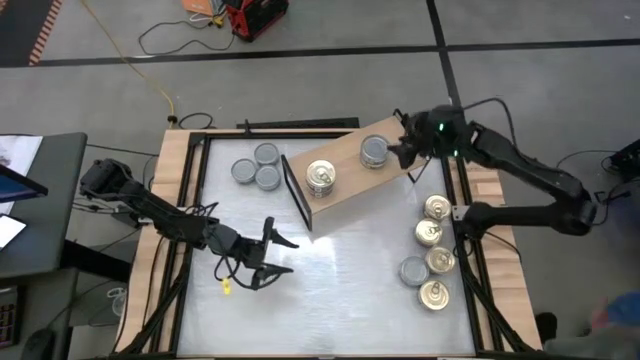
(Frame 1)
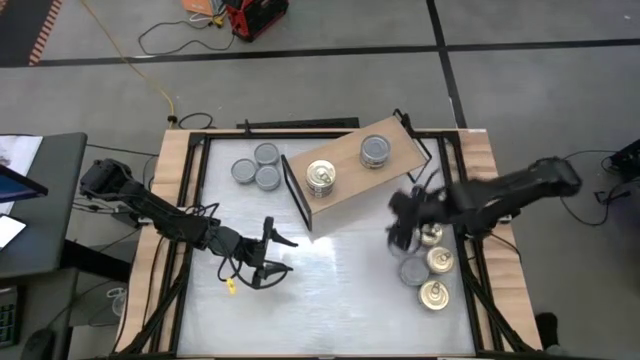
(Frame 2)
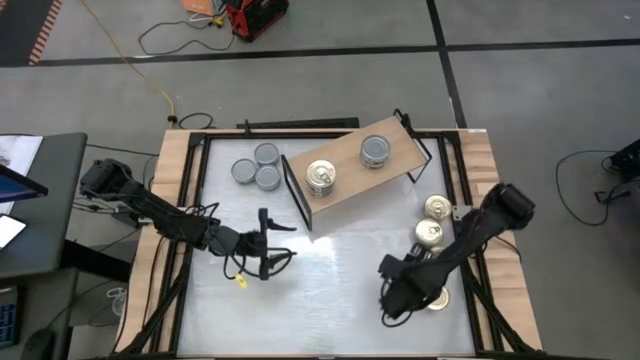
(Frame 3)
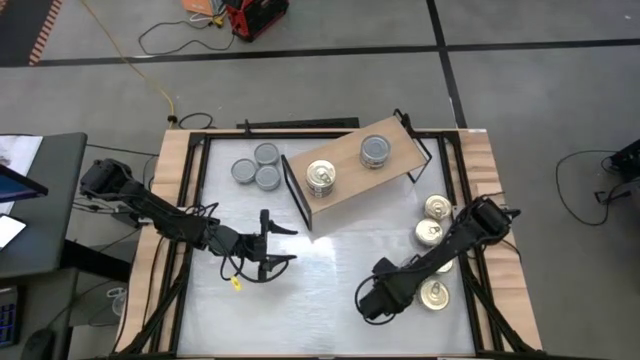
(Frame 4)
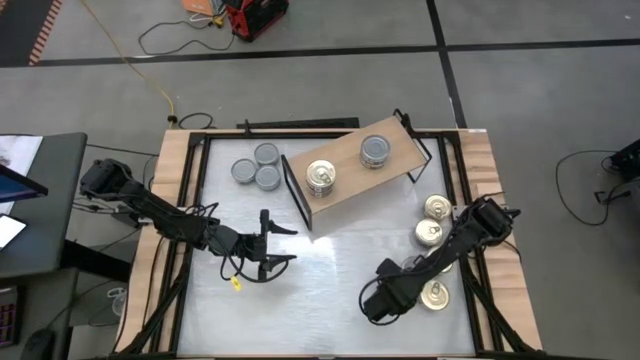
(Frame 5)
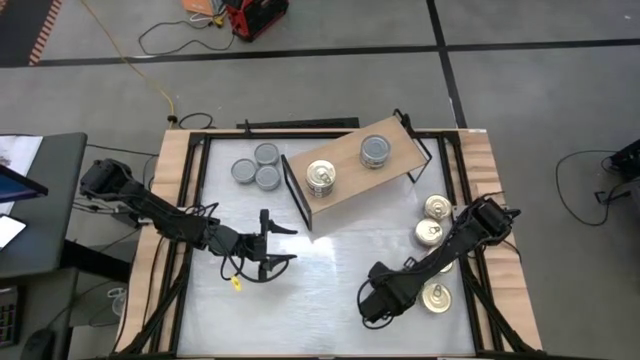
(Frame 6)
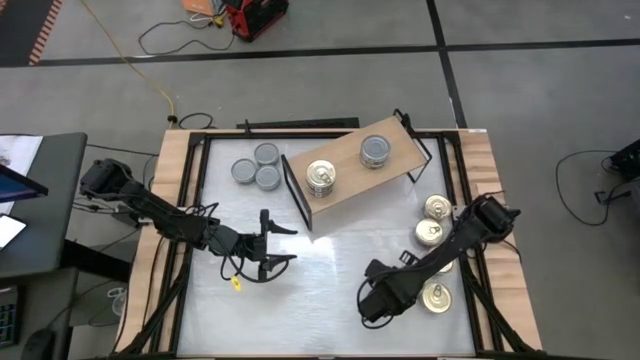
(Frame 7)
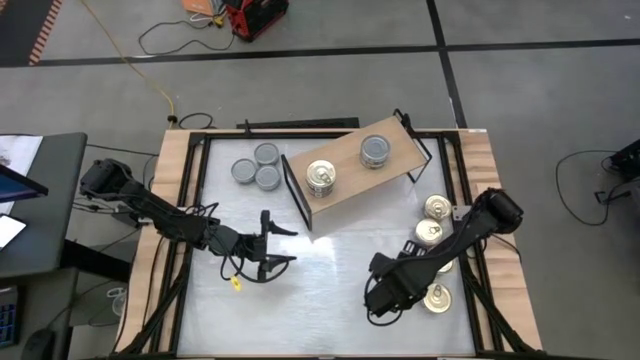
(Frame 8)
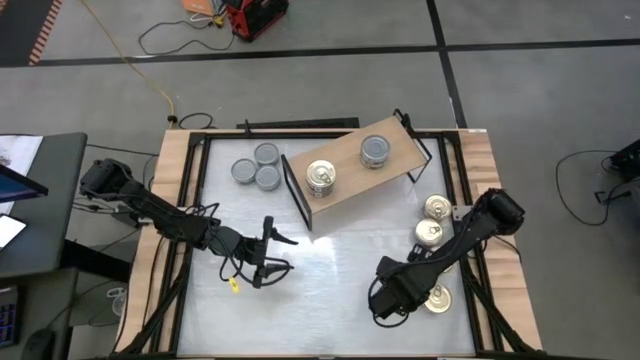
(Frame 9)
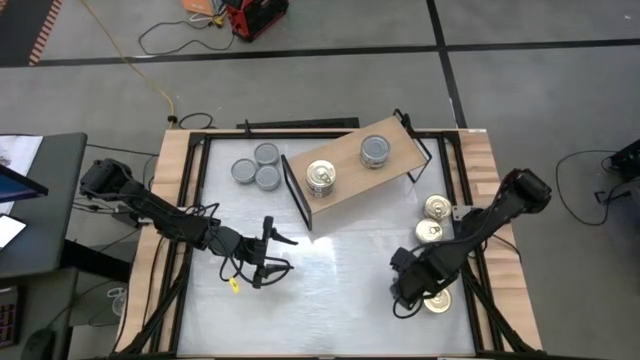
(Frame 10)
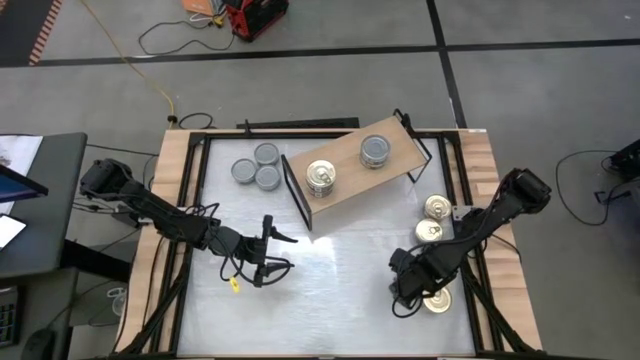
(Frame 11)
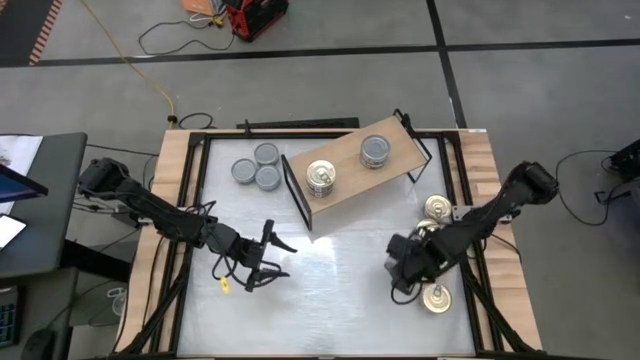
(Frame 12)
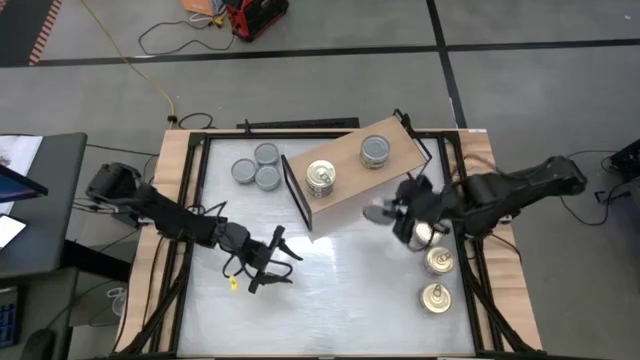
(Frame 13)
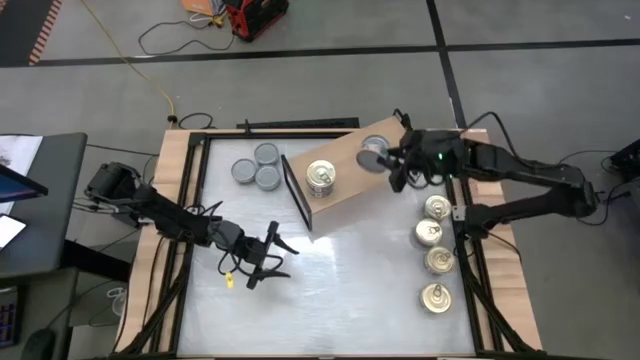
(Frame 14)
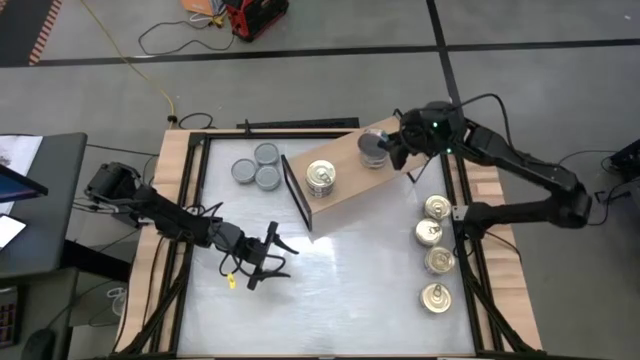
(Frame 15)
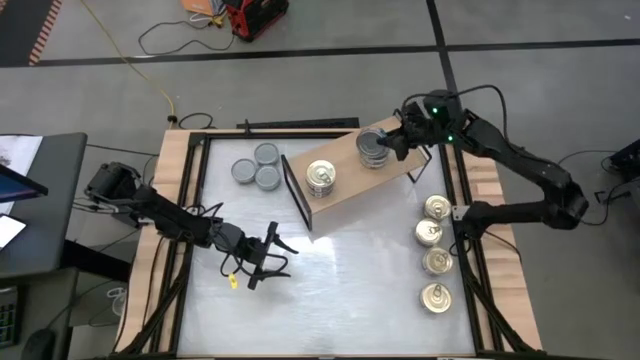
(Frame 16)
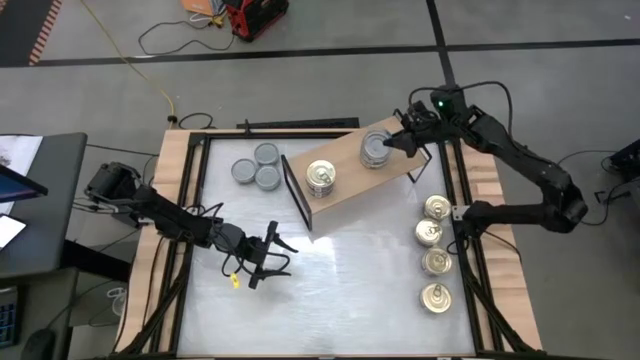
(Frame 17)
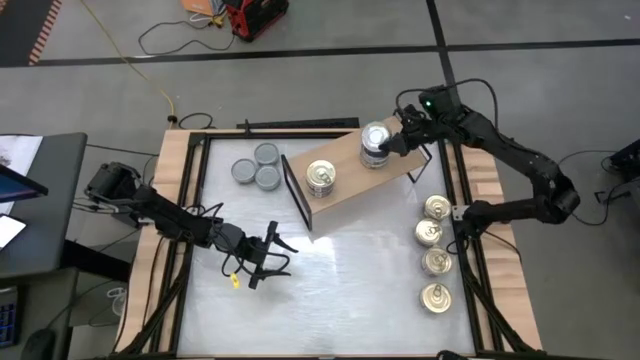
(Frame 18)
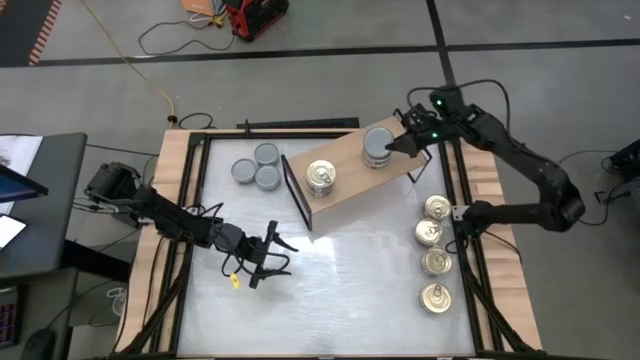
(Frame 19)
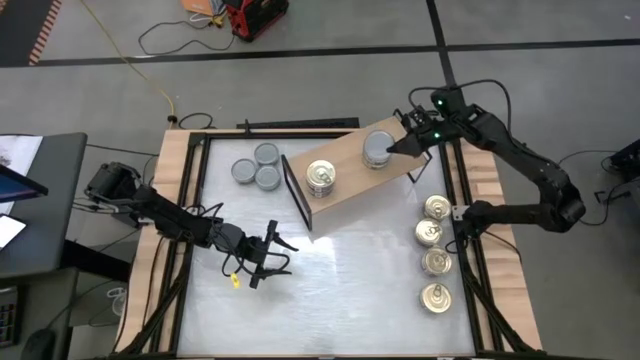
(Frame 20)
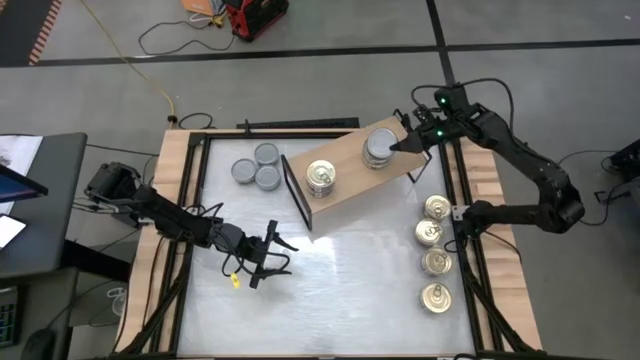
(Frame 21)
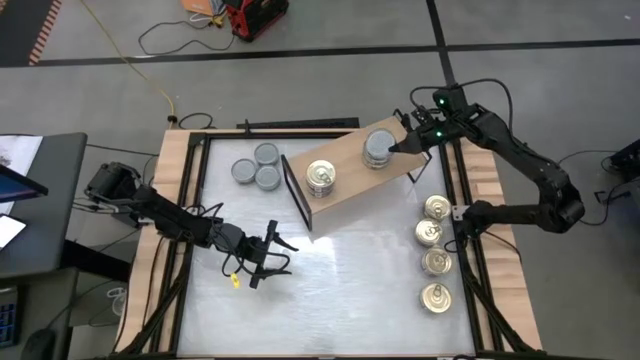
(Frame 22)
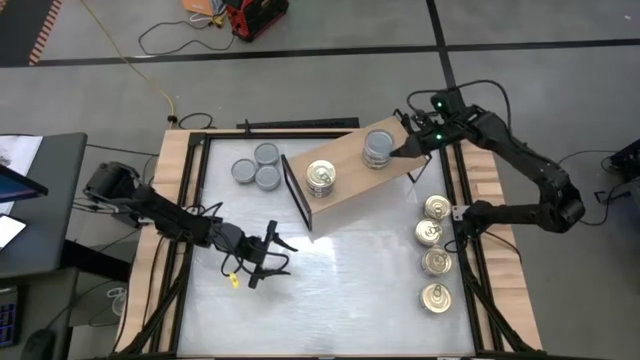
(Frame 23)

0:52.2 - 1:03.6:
Task: Stack canned seafood by type on shelf
Stack the green tuna can on top of the green tuna can

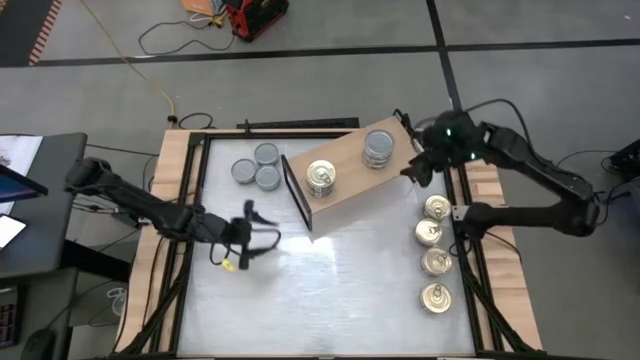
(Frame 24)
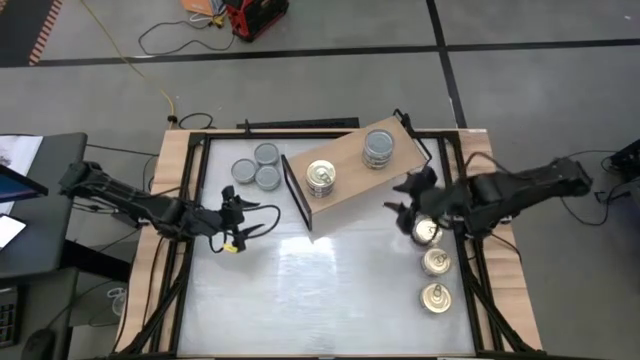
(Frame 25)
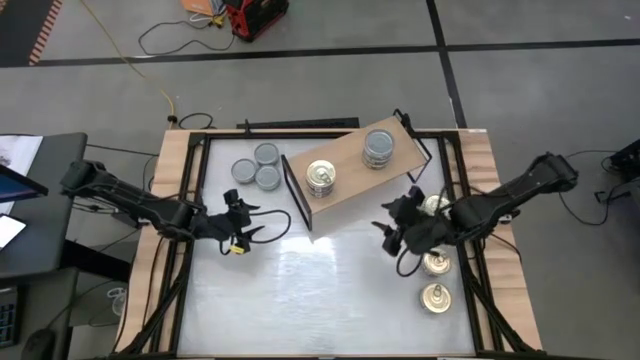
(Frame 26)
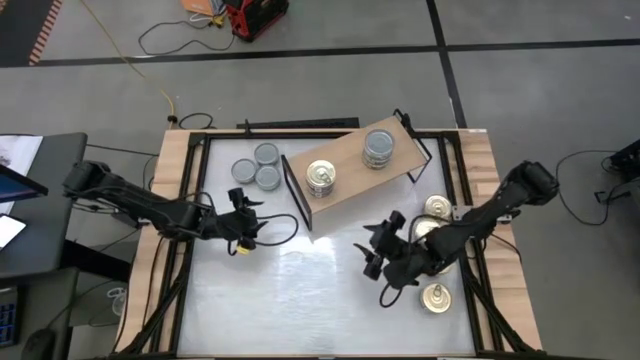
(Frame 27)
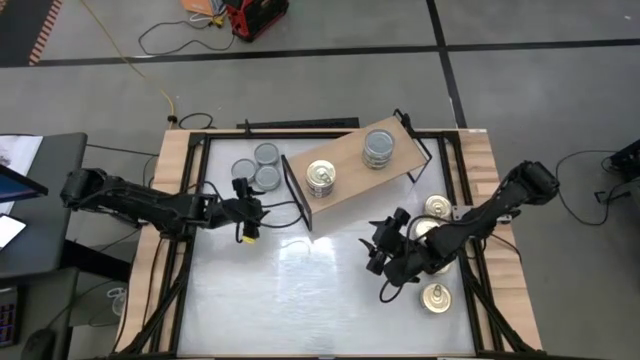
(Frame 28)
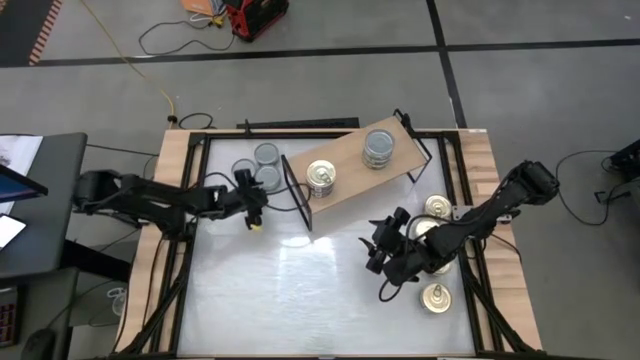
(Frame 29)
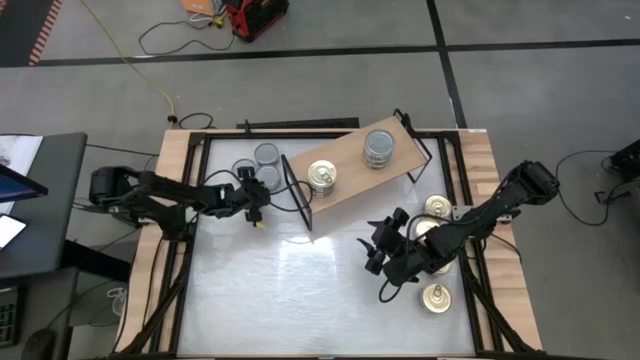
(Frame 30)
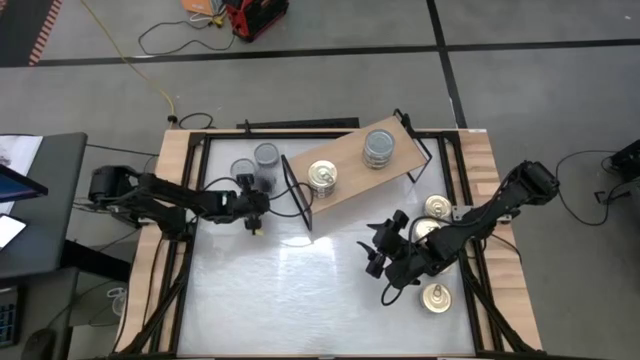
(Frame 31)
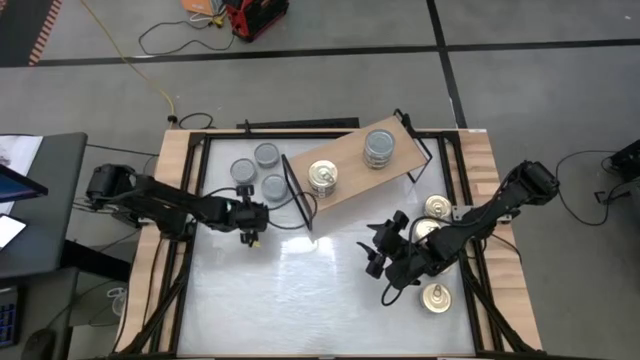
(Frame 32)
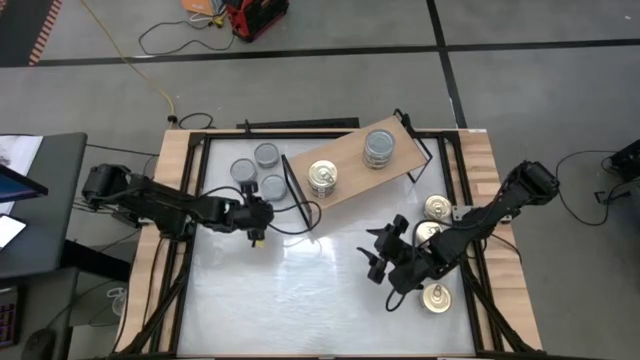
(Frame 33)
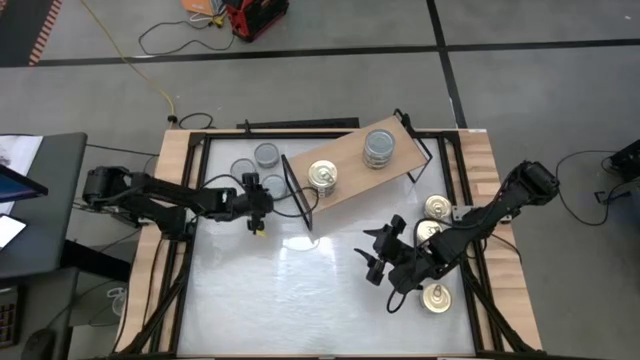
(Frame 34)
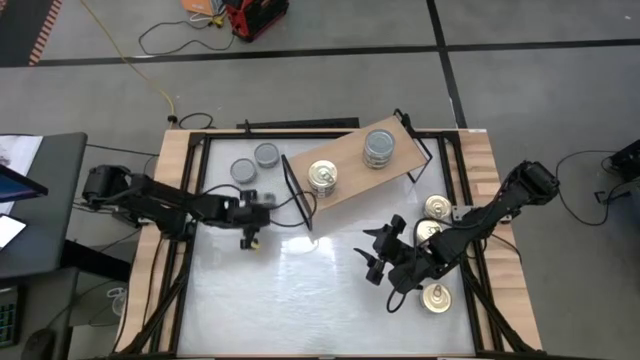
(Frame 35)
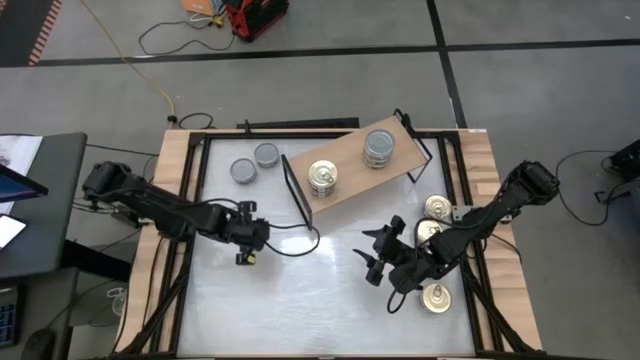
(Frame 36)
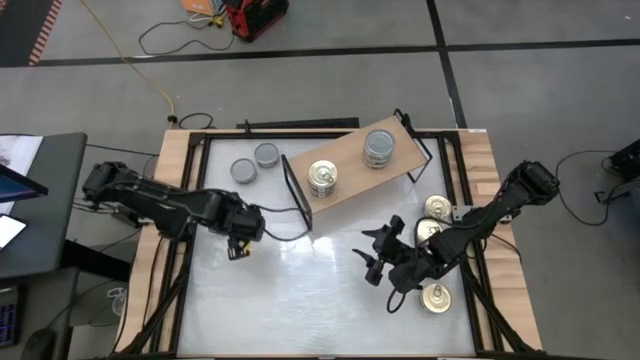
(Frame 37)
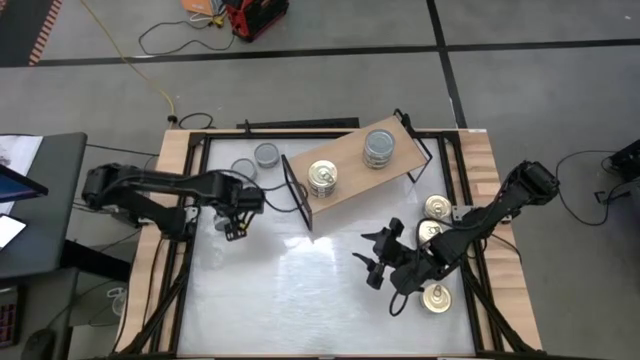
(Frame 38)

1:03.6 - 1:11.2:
Stack the green tuna can on top of the green tuna can

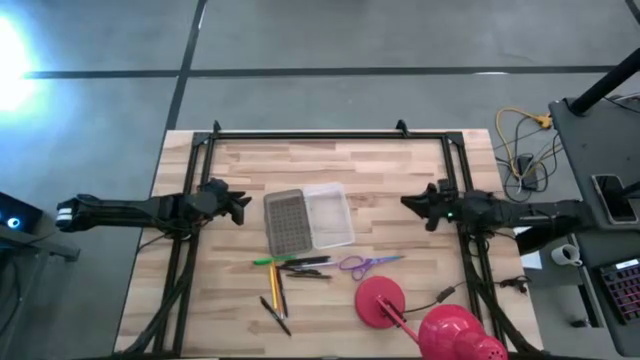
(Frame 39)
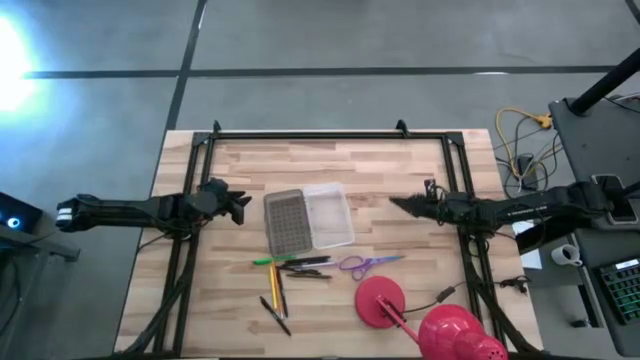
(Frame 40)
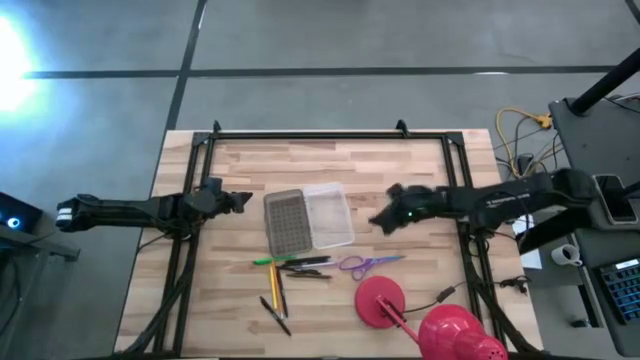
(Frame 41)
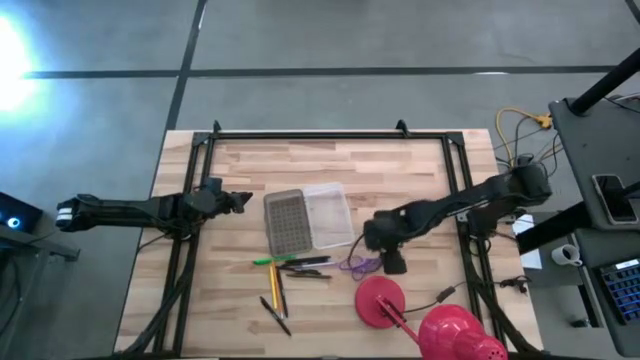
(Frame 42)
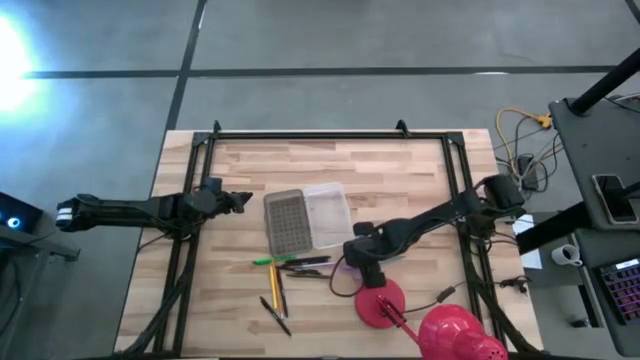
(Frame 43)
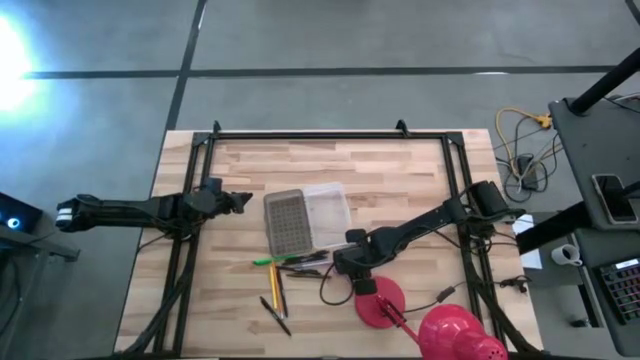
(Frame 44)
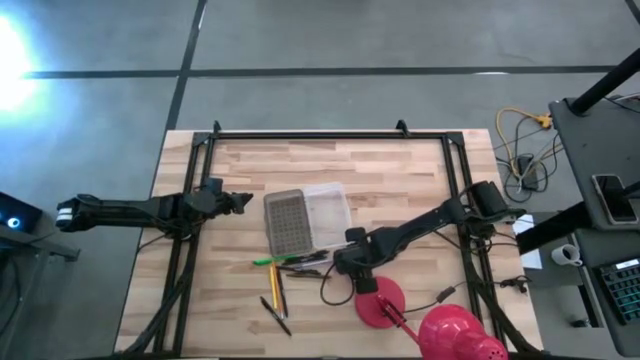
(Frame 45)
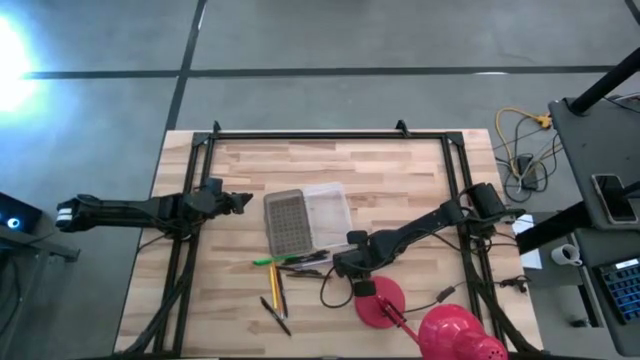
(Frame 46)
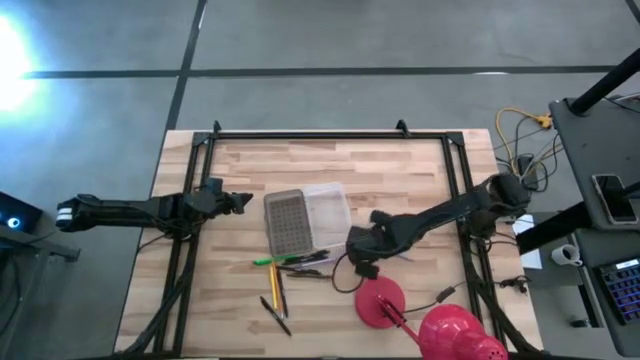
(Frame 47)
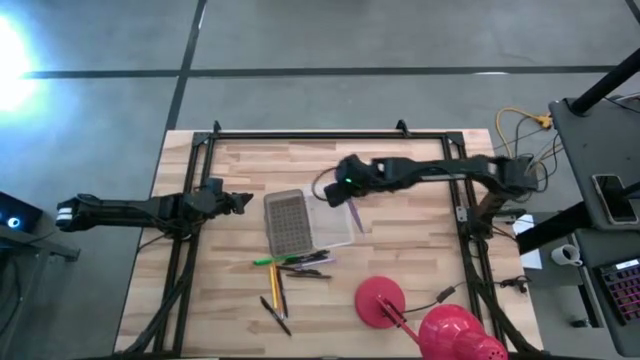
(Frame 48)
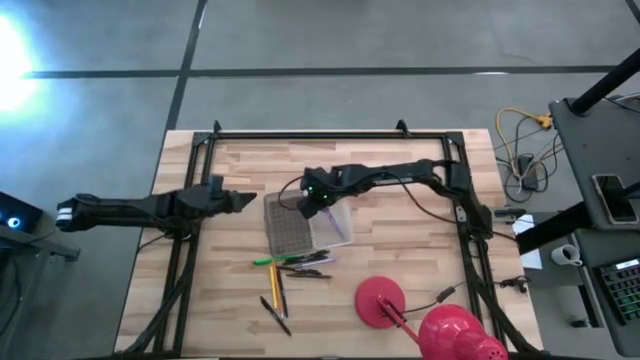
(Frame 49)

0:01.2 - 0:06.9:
Task: Pick & place school supplies into a supply box
Put the purple scissors into the black supply box
